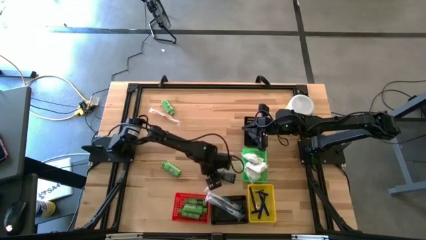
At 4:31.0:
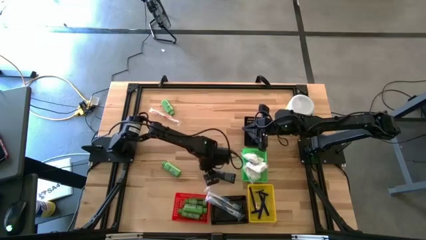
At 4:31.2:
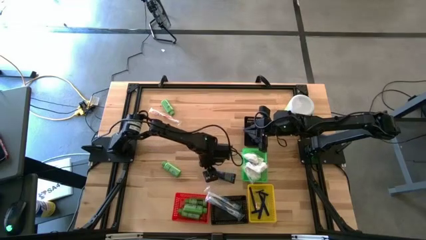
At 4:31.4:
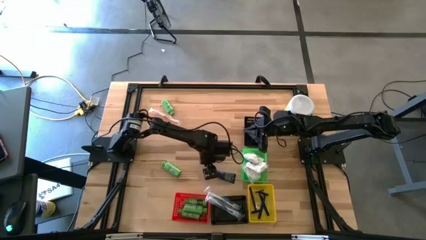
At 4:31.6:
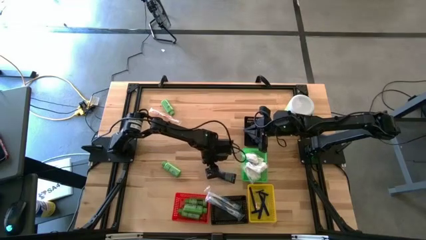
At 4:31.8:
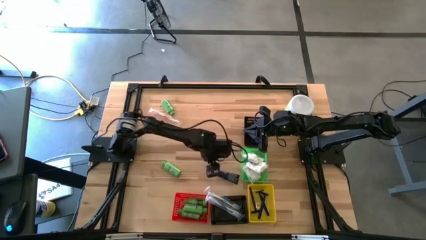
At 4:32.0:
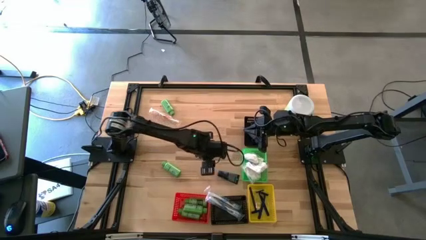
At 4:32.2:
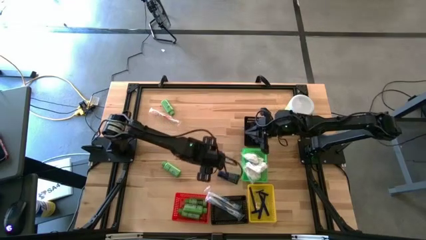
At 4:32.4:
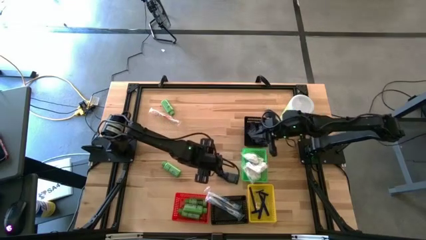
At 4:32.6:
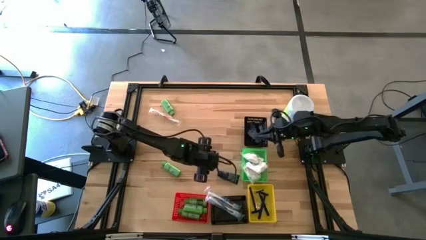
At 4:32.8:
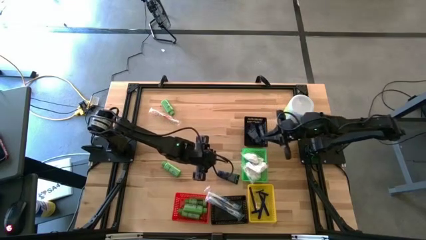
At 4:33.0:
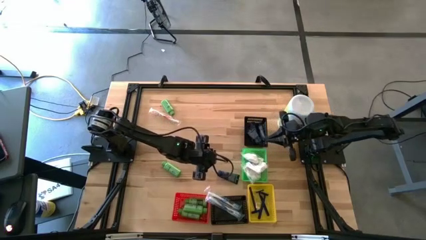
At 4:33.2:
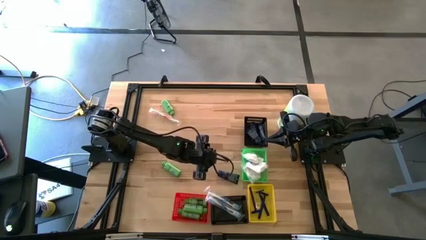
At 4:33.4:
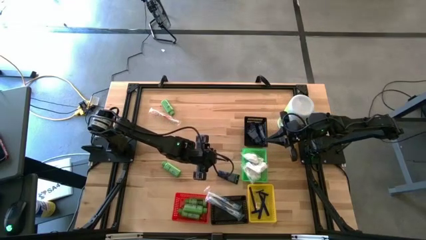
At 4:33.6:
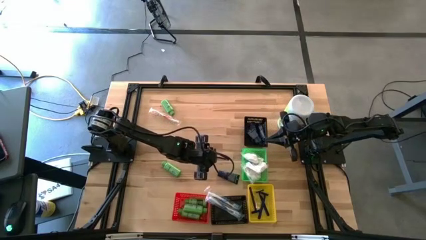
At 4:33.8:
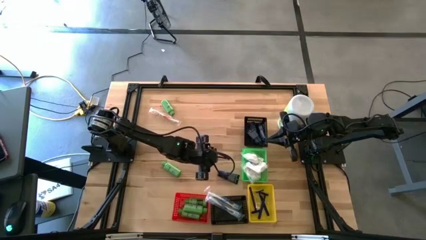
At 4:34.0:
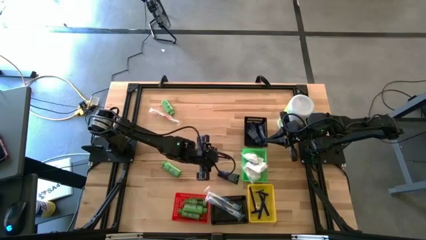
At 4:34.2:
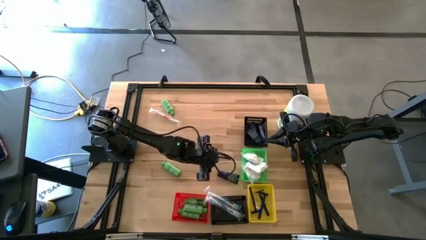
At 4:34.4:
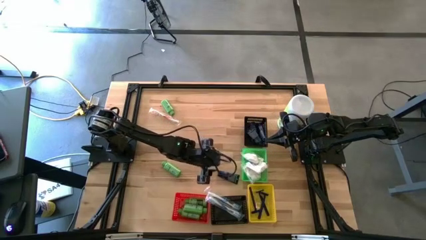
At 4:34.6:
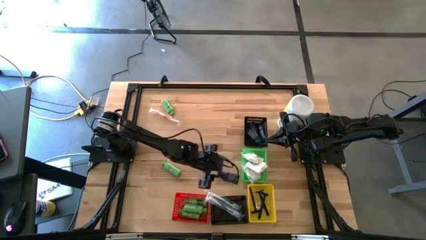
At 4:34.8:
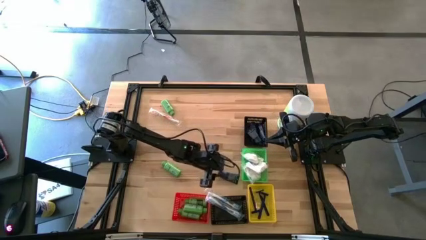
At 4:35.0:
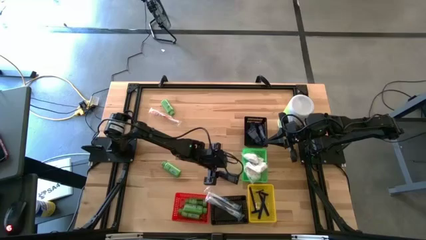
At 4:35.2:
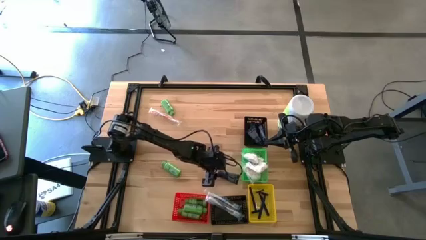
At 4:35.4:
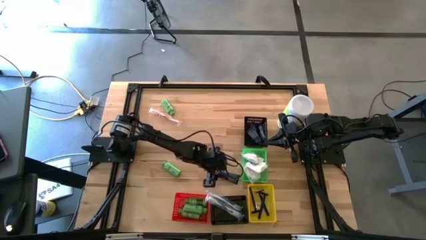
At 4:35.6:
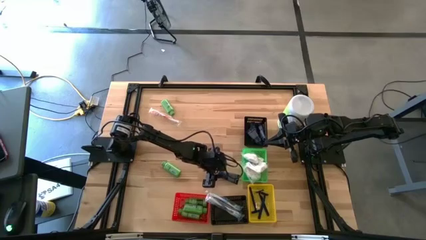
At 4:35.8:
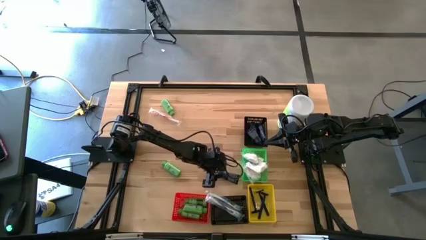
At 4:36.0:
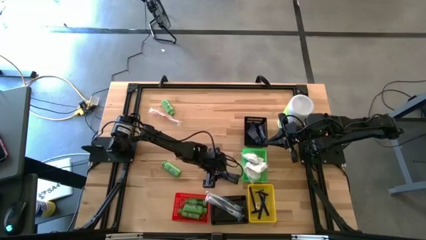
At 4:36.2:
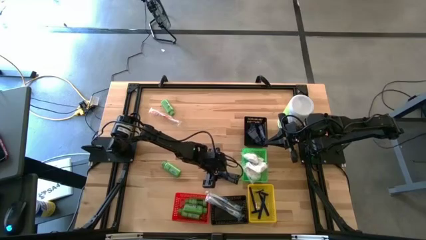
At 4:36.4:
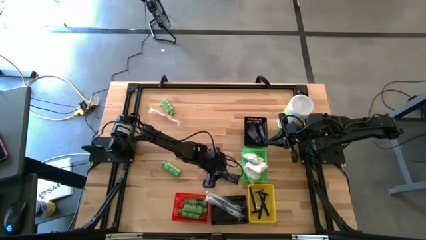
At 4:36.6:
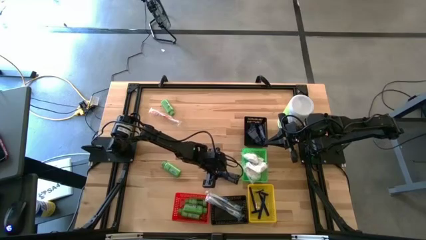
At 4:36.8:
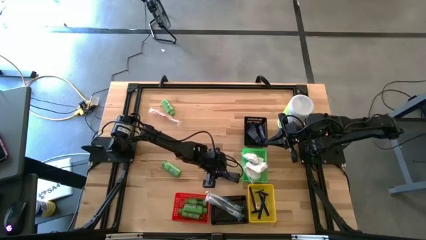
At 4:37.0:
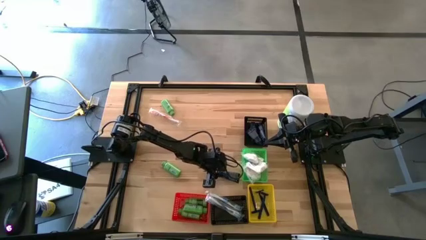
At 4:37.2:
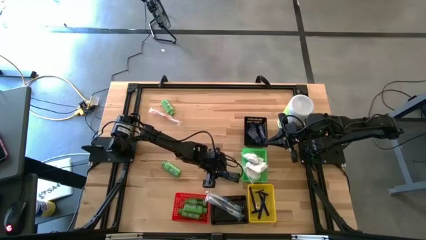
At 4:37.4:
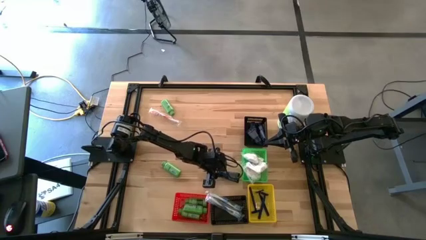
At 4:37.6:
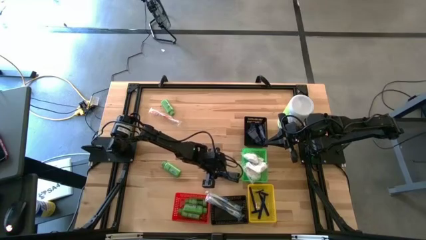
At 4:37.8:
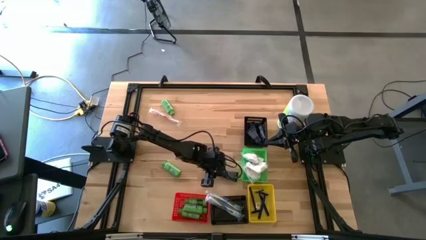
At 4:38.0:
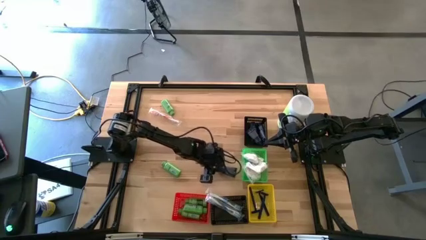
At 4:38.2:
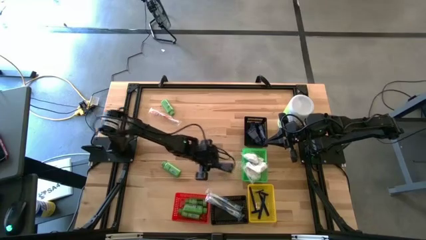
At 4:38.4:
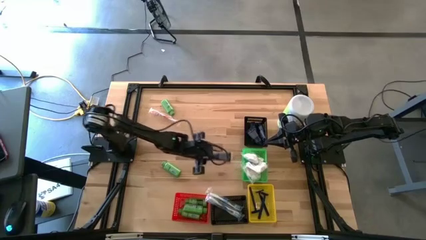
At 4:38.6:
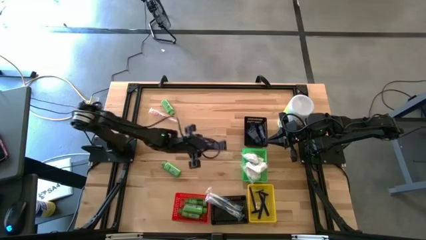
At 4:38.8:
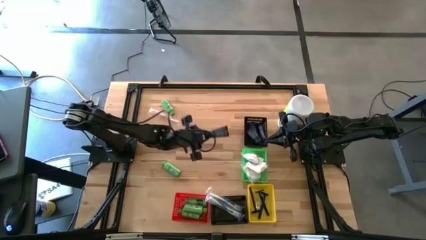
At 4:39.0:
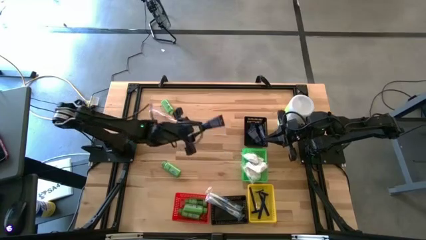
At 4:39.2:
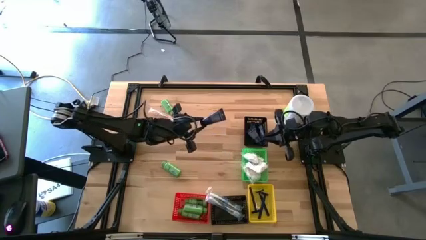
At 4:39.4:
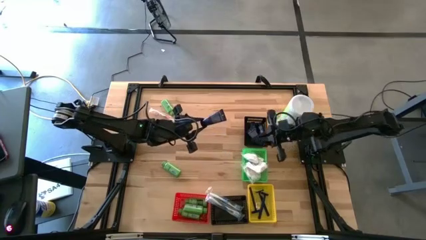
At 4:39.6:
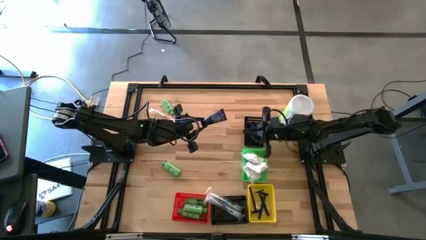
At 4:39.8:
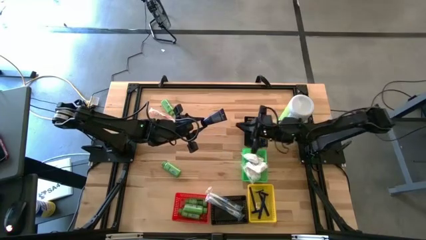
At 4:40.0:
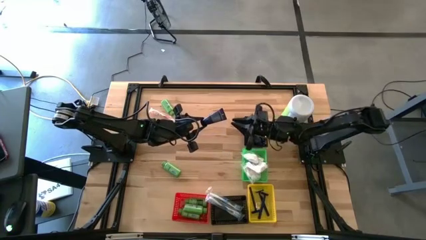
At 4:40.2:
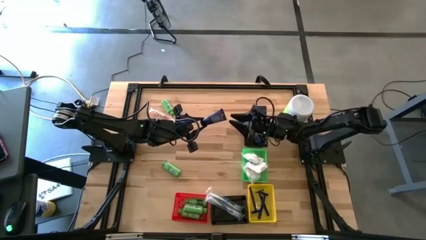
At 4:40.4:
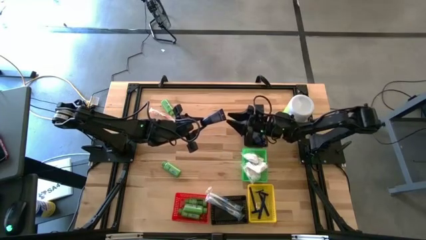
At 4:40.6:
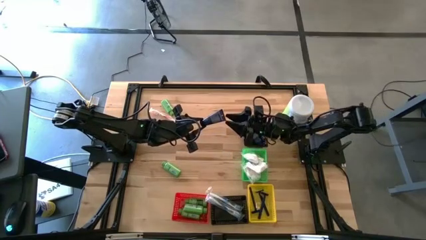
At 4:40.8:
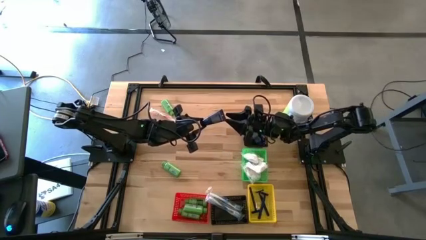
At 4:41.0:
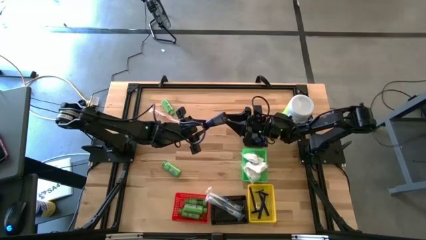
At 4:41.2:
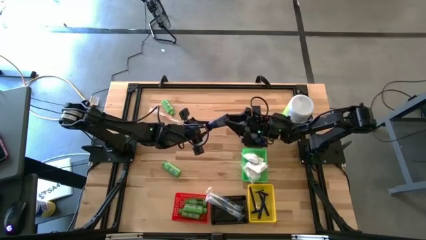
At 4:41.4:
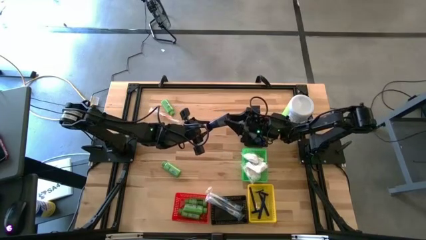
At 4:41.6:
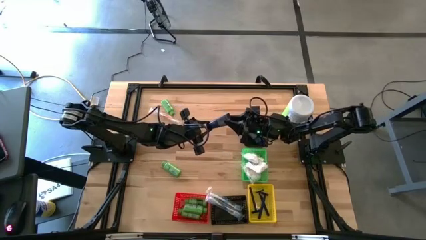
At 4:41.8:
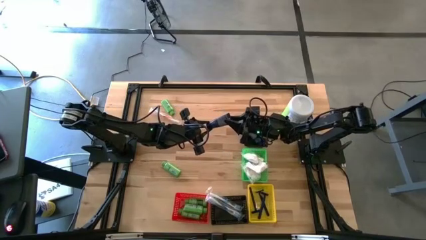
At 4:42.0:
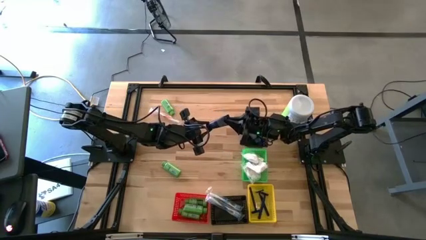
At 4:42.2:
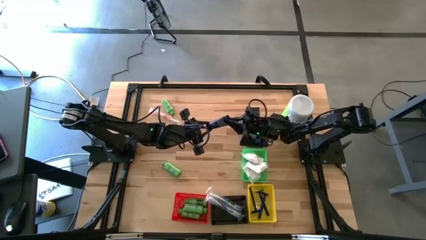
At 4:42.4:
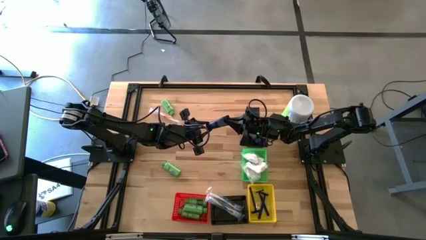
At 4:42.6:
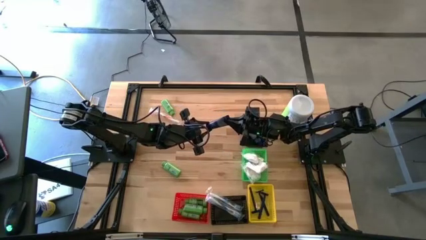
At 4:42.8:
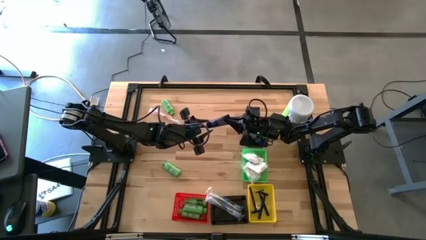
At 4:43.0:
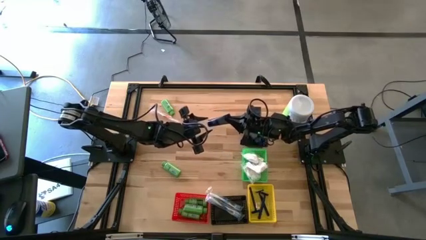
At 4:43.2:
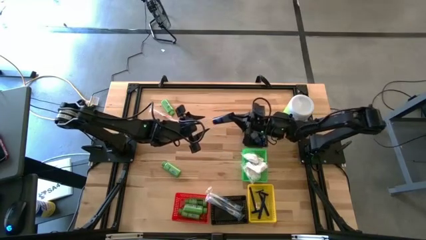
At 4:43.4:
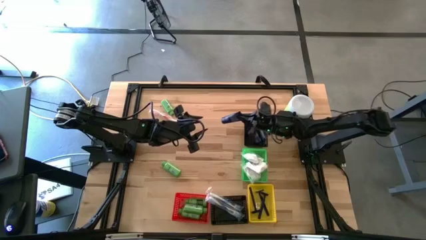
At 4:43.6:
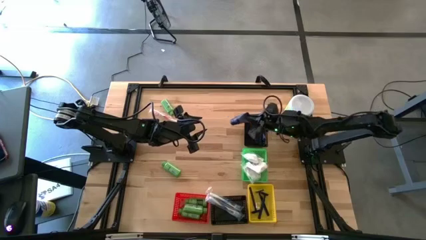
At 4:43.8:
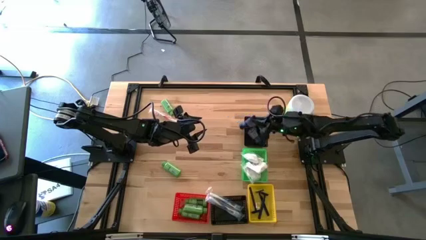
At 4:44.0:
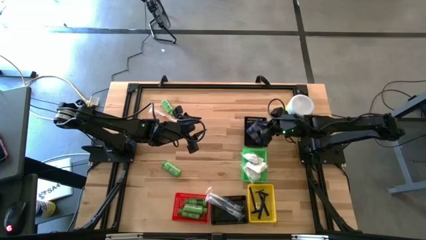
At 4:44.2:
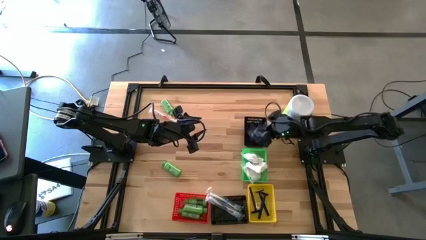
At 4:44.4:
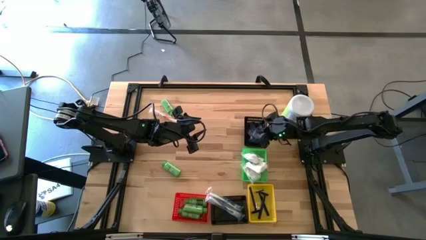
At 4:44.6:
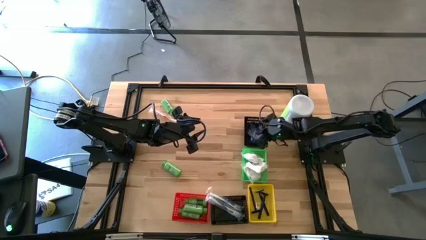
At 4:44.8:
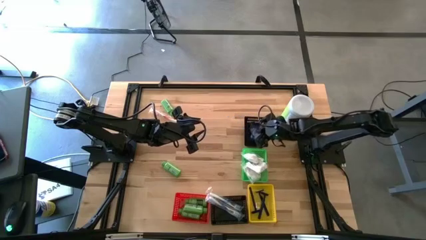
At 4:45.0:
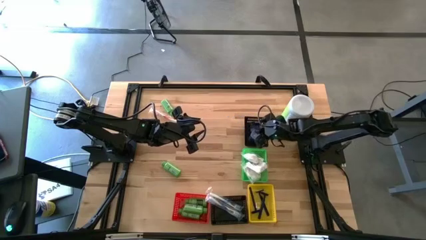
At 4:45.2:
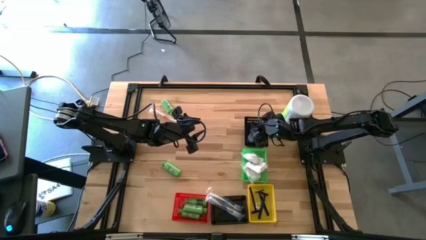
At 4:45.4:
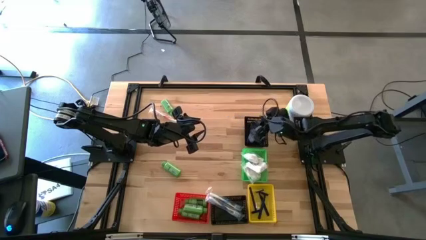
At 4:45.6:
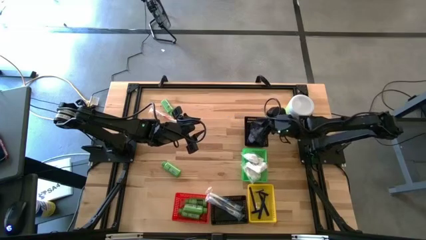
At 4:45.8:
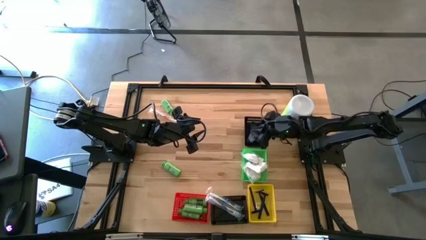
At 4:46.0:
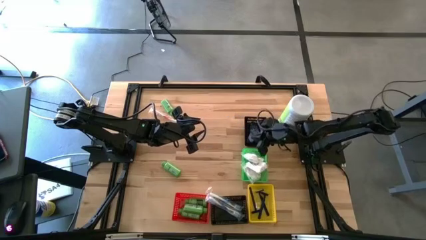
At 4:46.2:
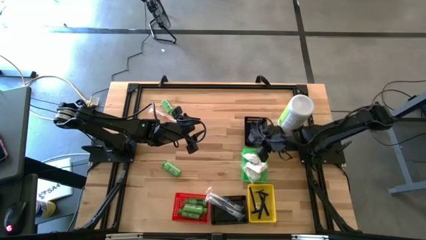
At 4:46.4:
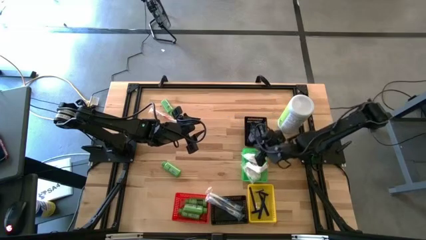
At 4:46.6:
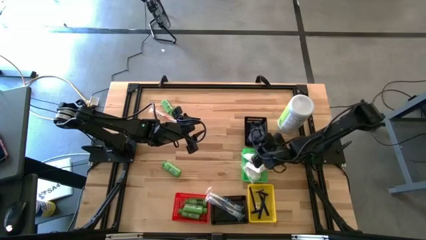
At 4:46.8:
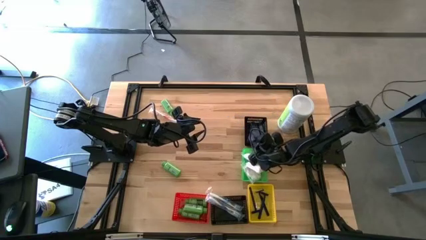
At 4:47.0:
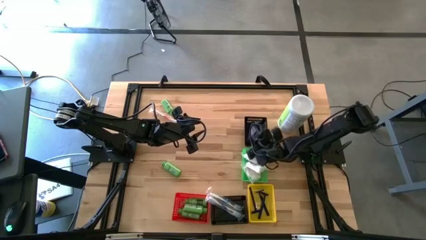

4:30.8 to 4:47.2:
Task: Pick & Place Travel size toiletries
Put the blue shaving cream into the top black bin
